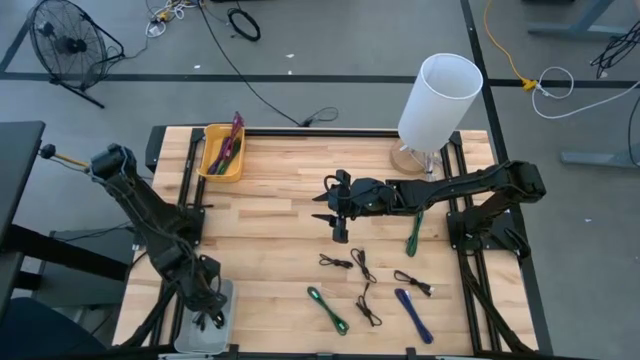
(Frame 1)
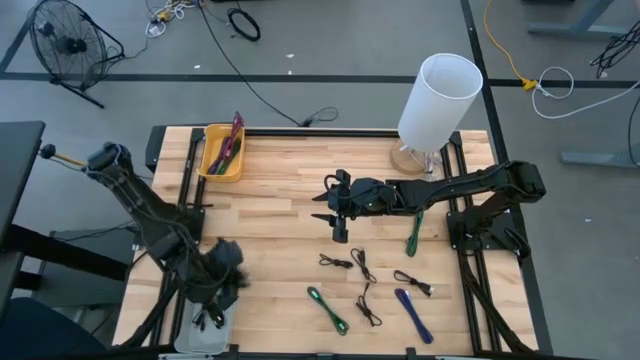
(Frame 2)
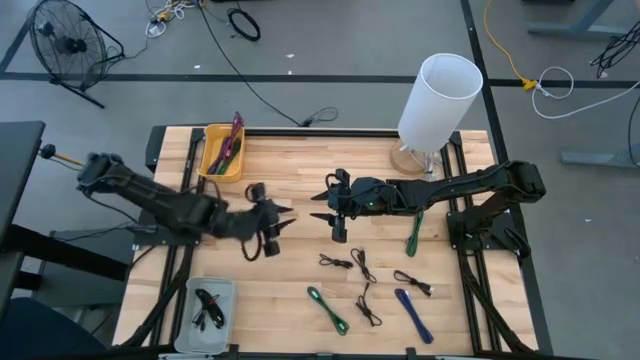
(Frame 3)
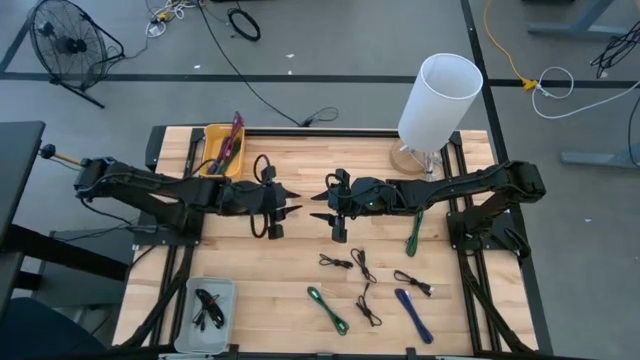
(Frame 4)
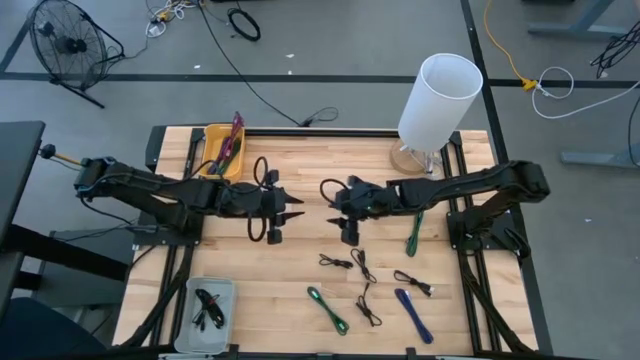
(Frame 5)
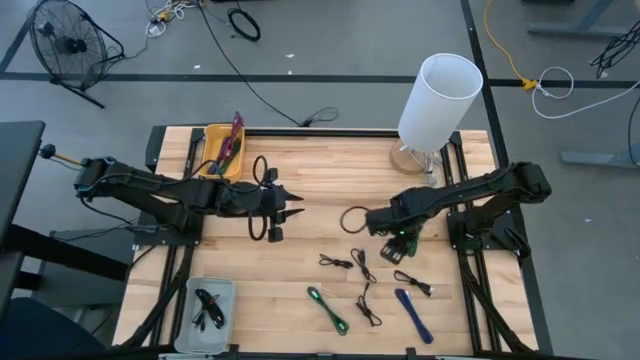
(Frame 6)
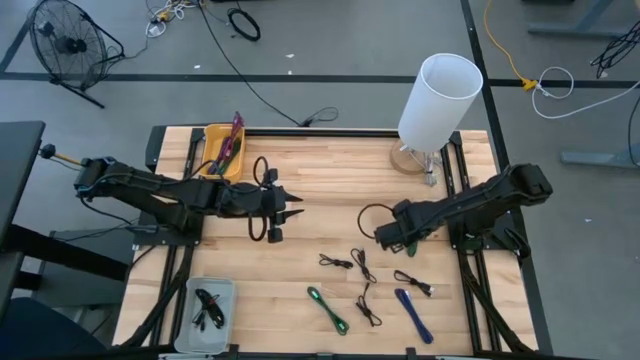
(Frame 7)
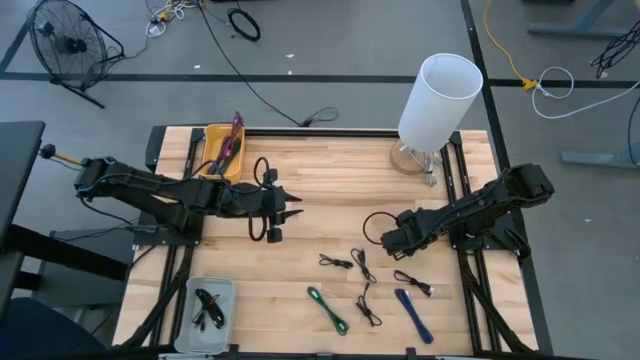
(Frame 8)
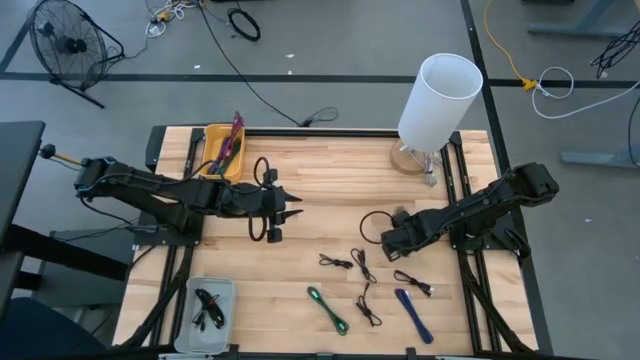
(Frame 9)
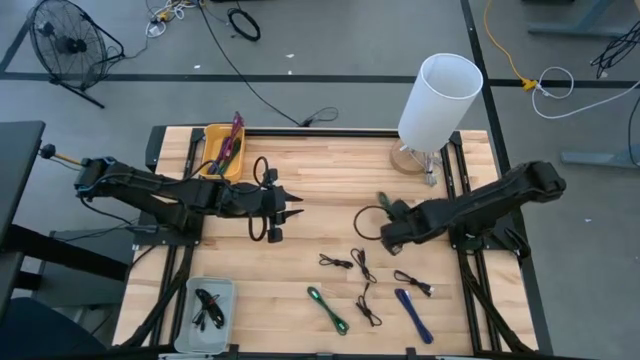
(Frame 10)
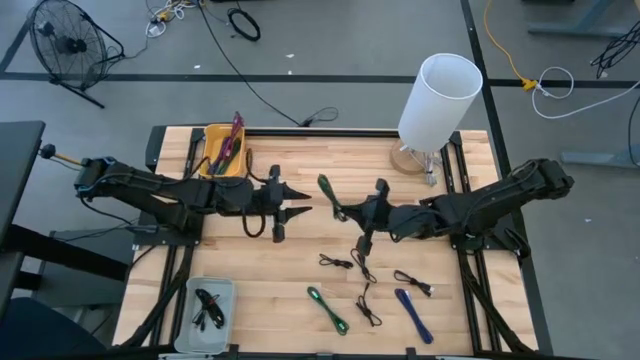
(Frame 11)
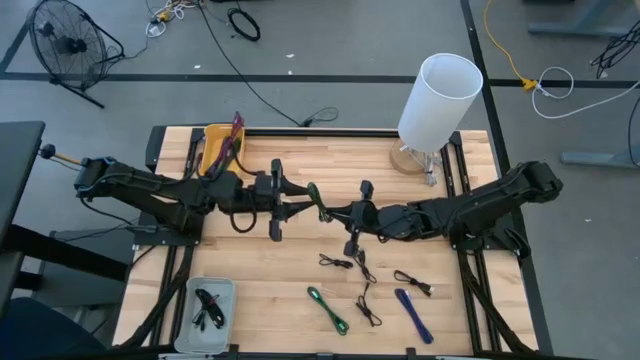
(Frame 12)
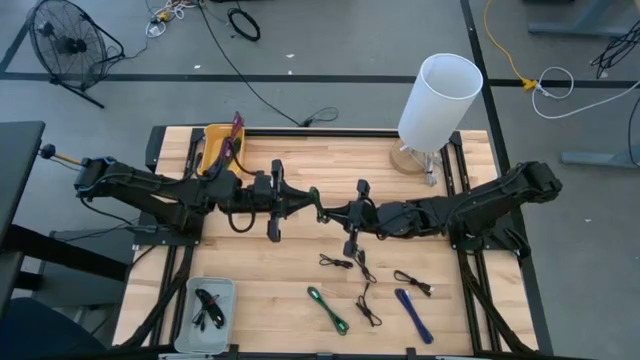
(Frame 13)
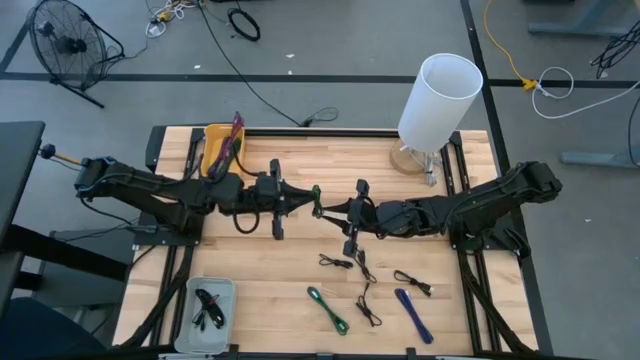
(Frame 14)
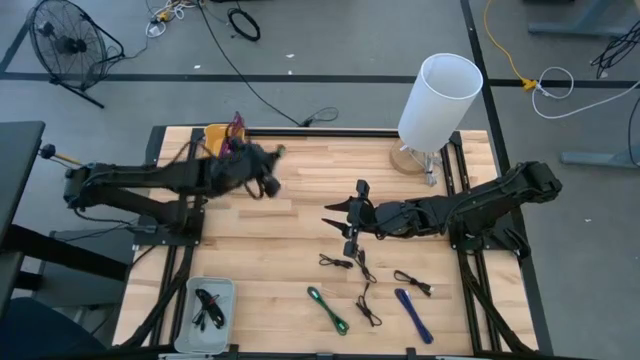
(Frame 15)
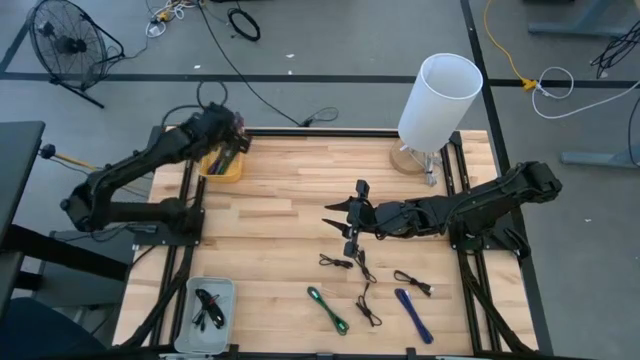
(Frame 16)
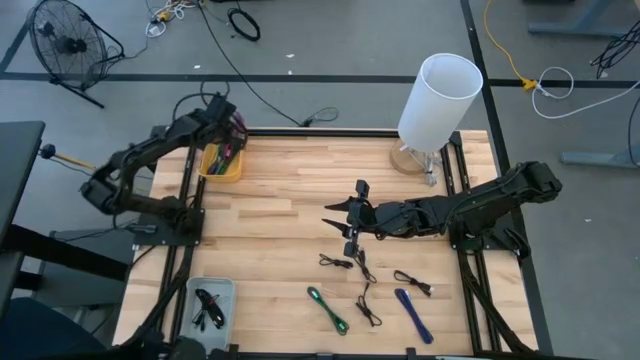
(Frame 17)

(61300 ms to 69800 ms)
Task: Pick & Place USB Port
Put the green charger cable into the yellow bin

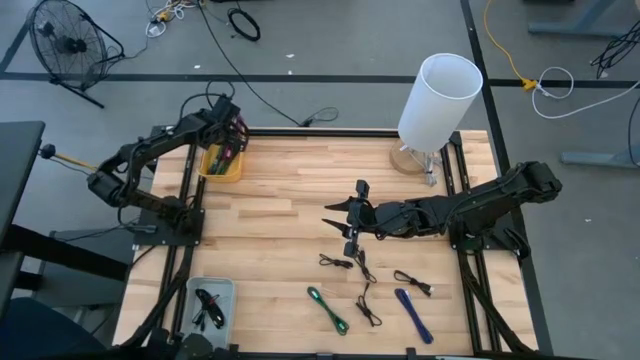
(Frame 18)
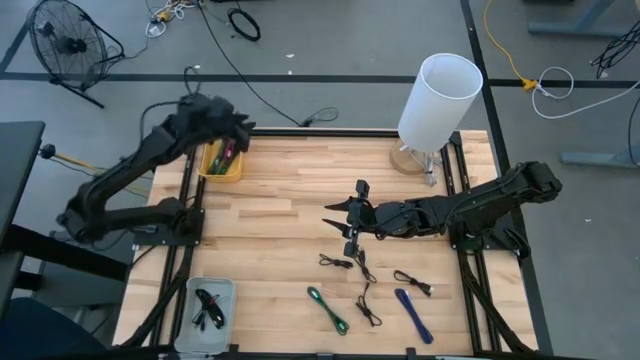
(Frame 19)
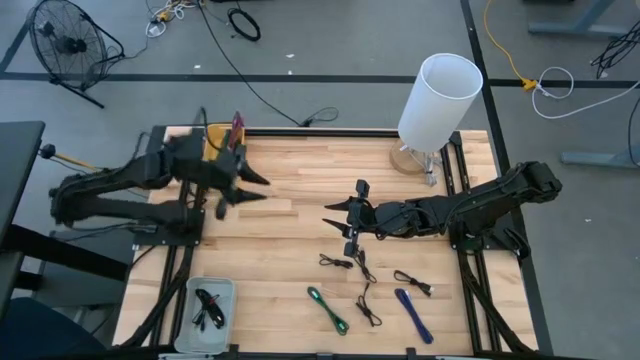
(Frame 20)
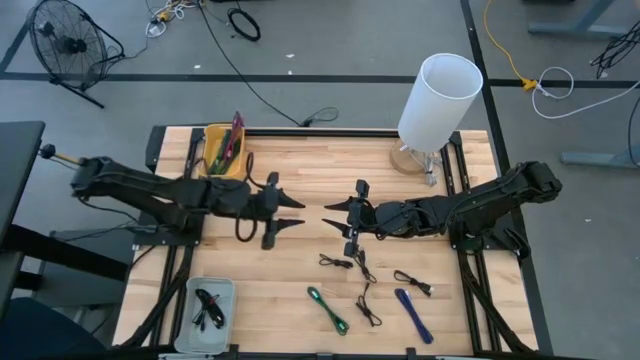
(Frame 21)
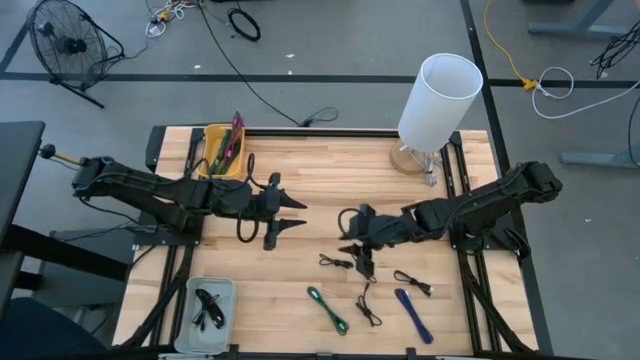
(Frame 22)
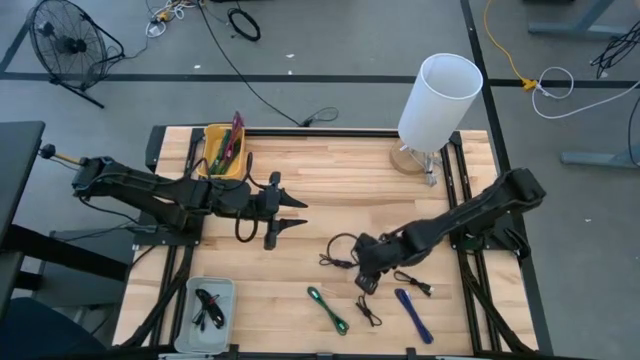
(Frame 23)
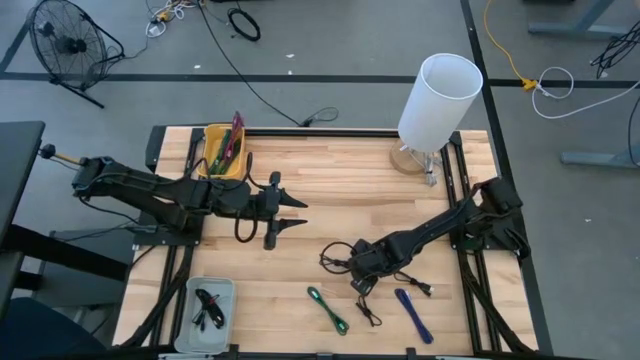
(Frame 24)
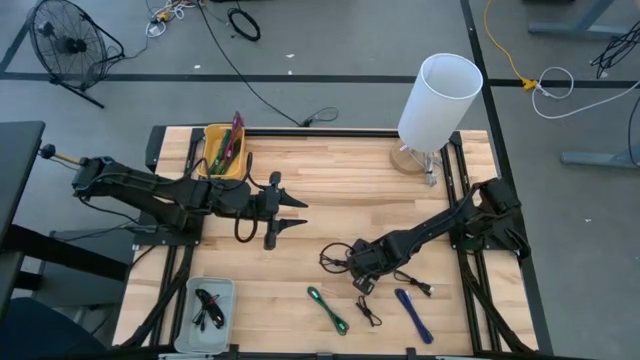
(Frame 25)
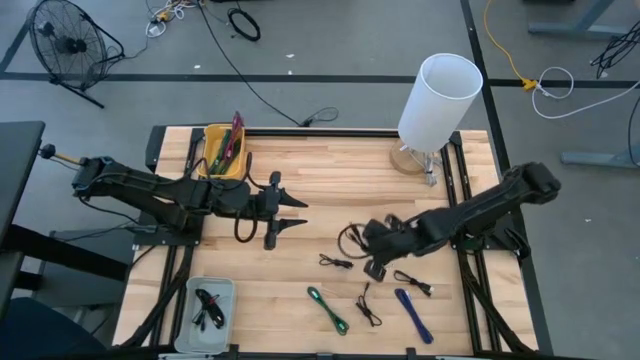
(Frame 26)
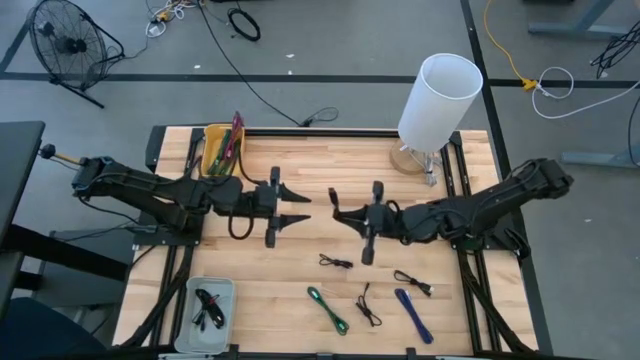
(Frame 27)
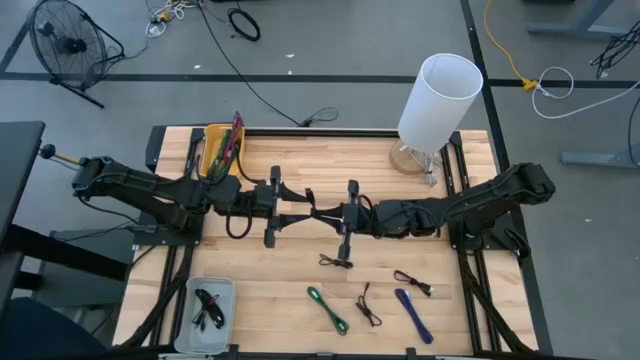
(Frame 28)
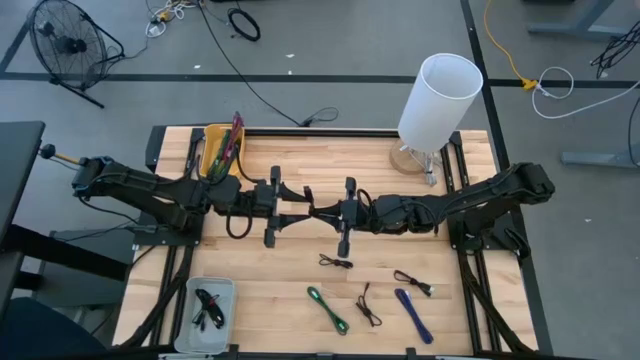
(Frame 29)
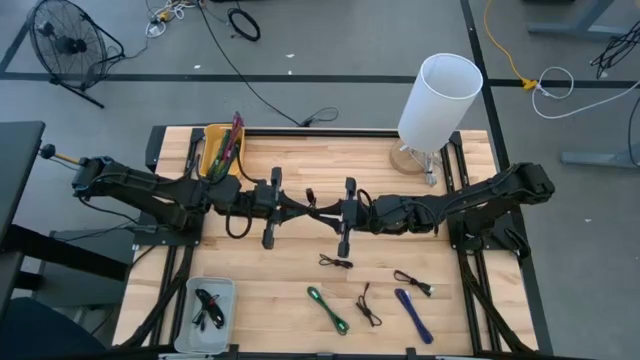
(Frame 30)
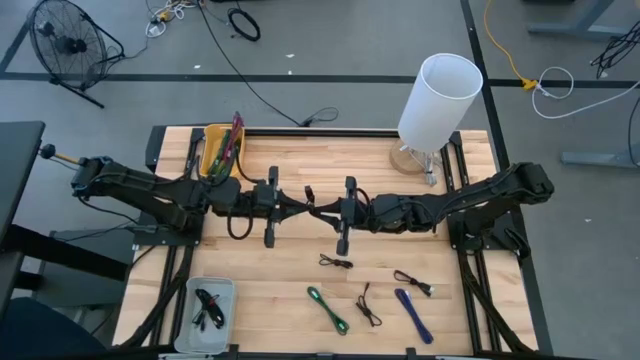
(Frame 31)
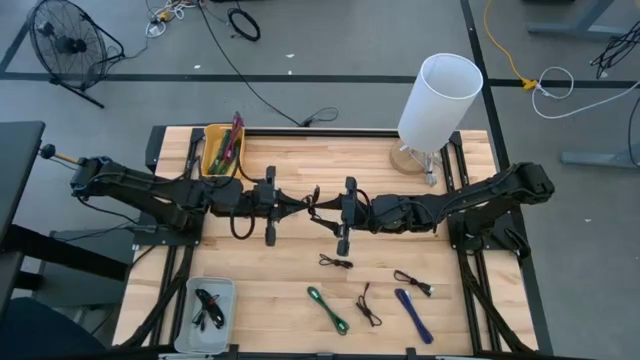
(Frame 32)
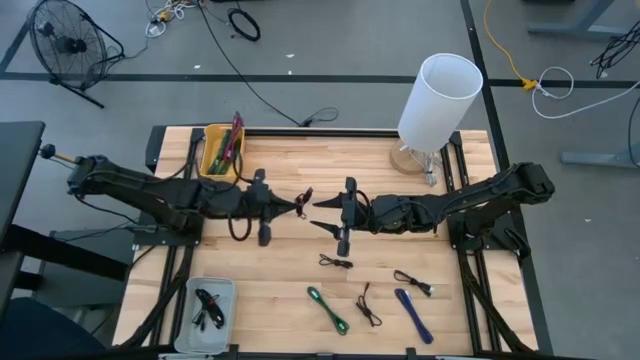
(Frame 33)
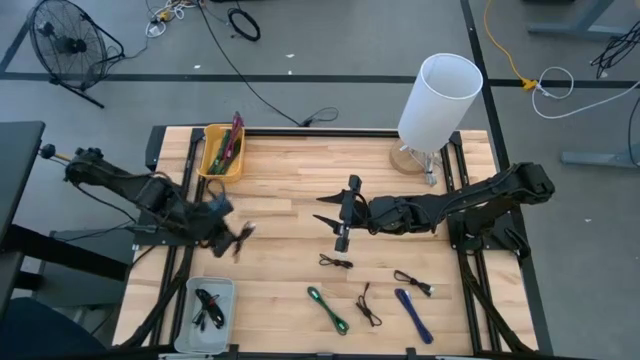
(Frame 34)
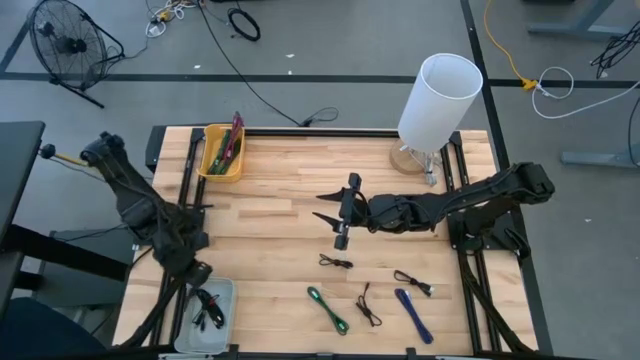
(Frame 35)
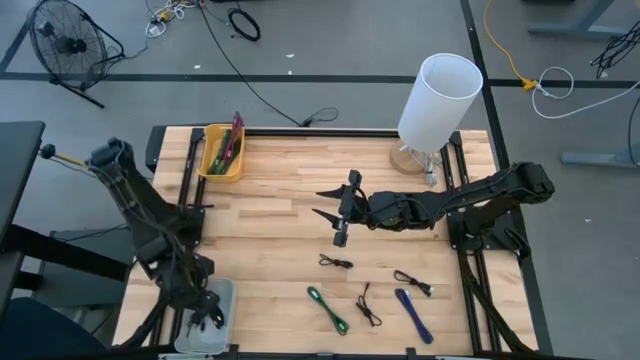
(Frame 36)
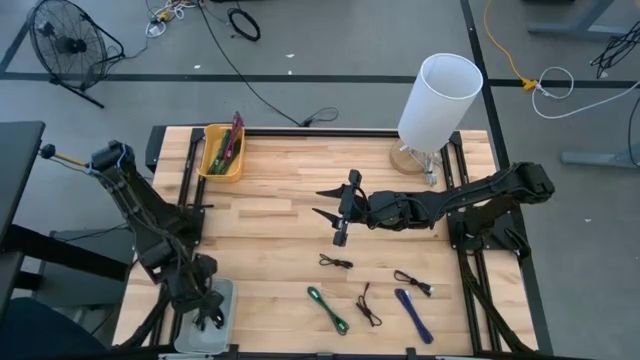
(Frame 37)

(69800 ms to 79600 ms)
Put the black charger cable into the gray bin

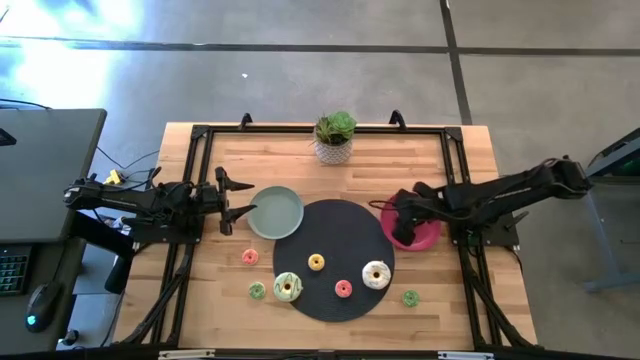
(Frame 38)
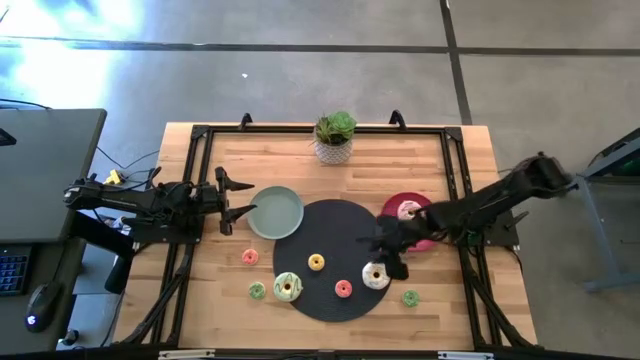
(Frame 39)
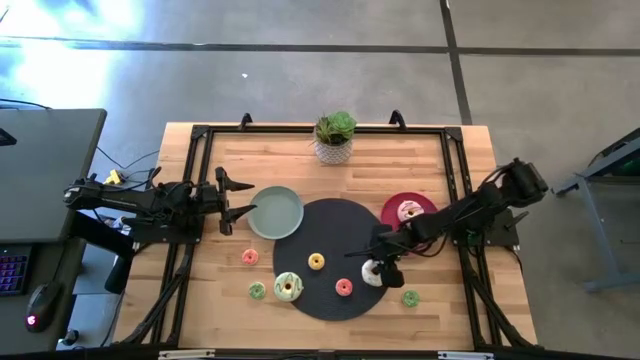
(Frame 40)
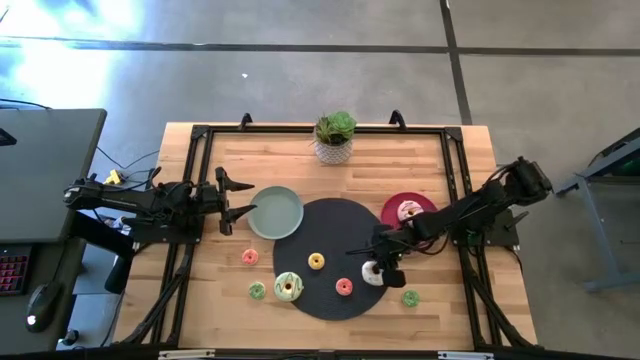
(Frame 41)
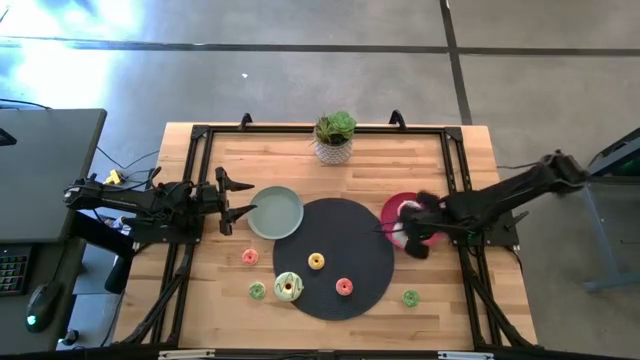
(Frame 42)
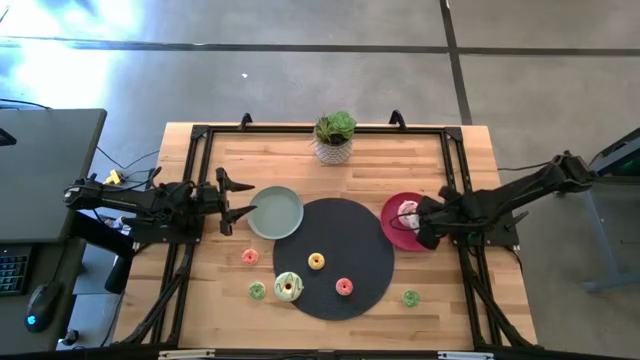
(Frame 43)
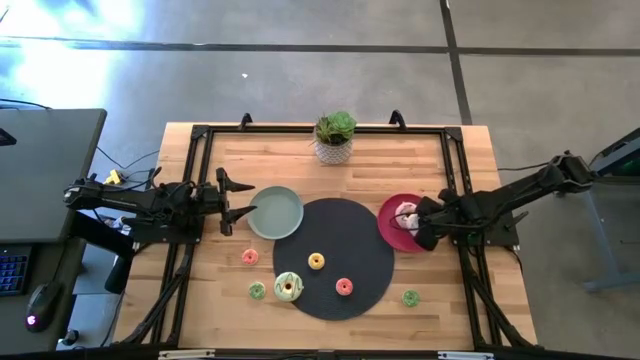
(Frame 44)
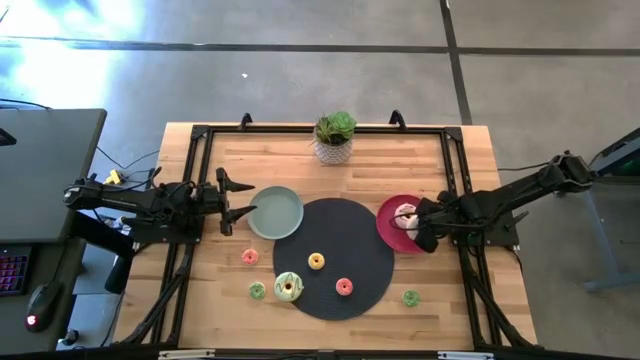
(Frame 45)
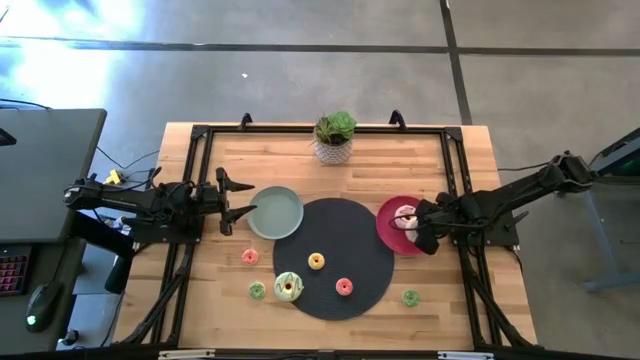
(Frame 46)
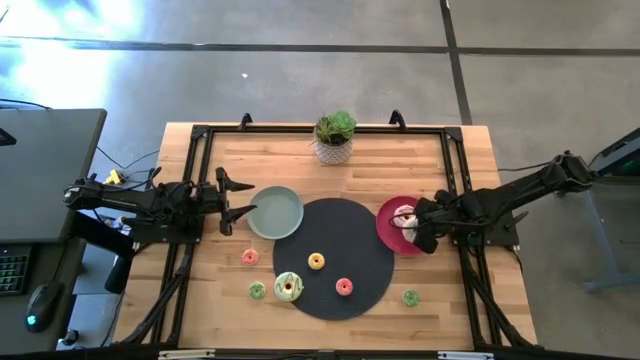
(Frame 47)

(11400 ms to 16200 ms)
Task: Pick & Place donuts
Put the large white donut on the red plate
